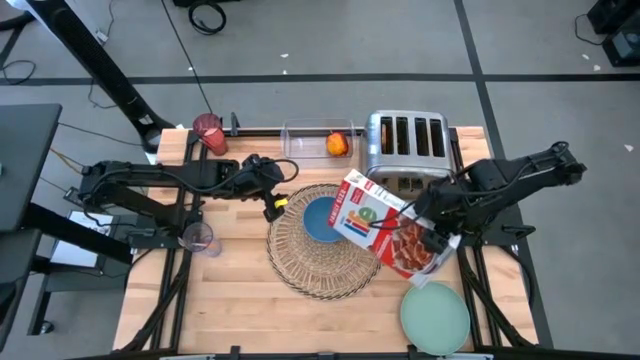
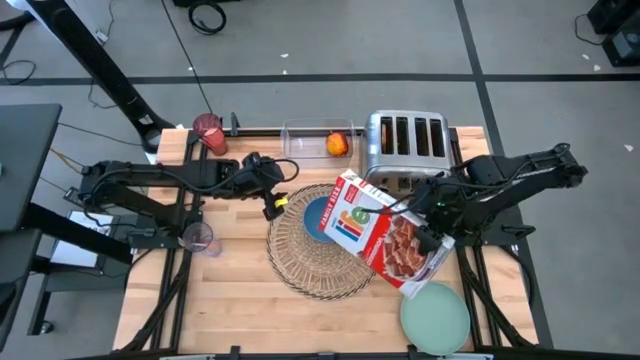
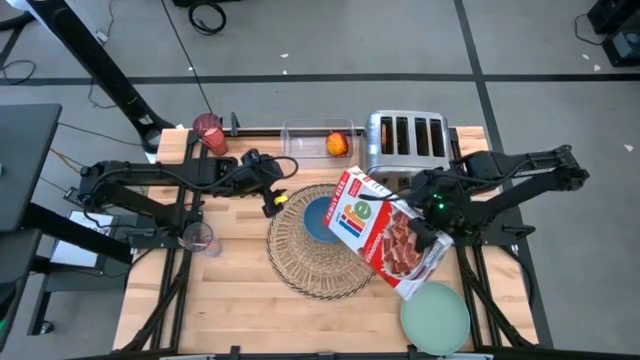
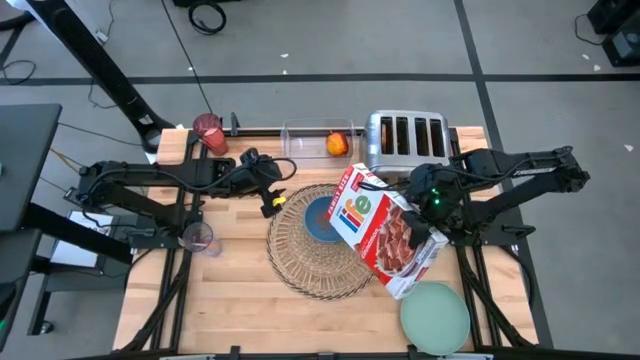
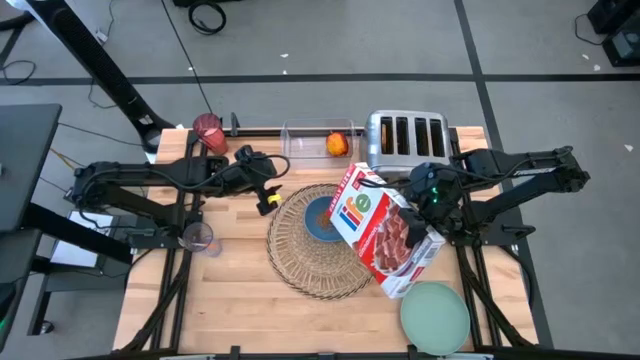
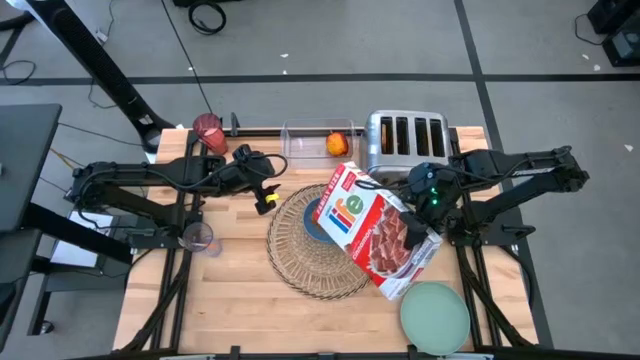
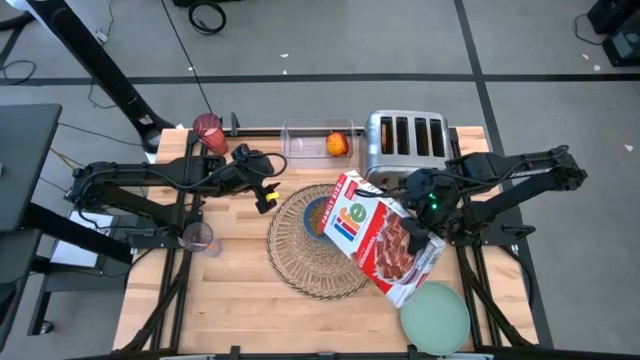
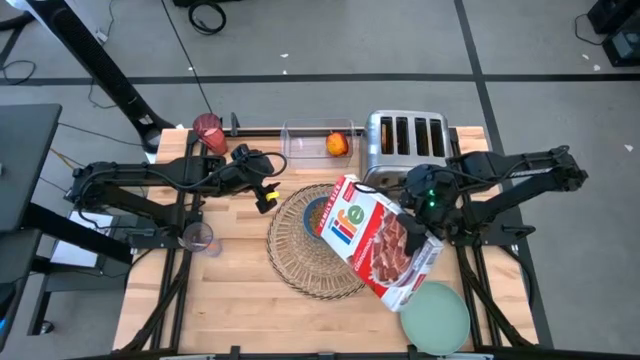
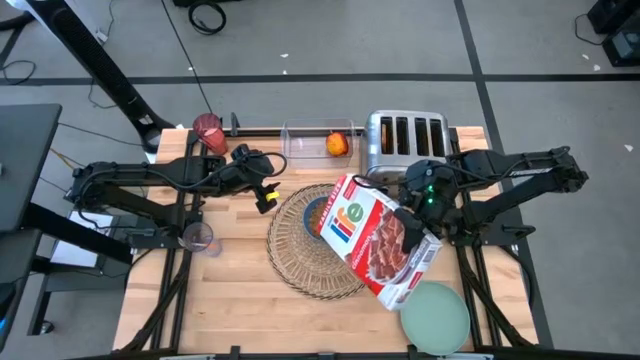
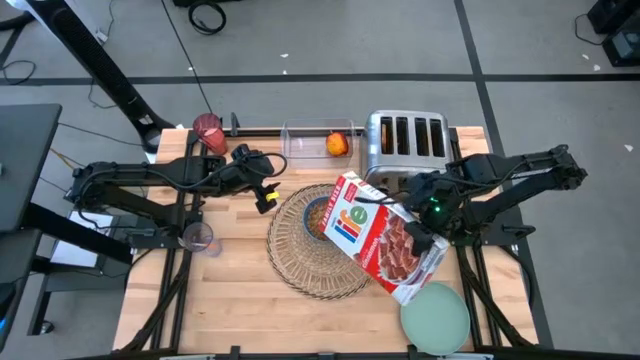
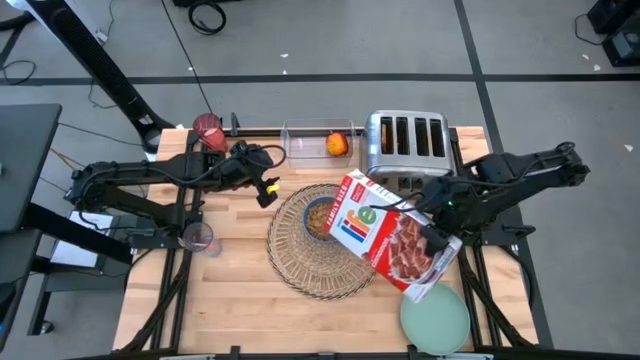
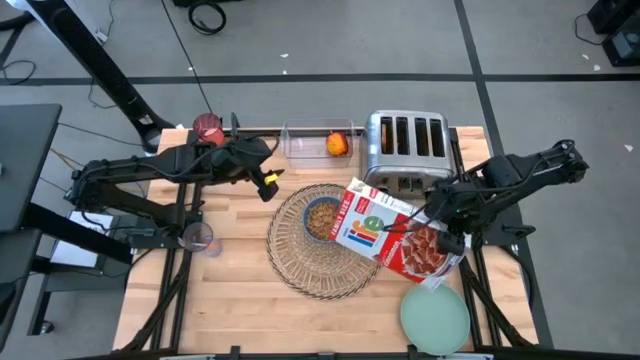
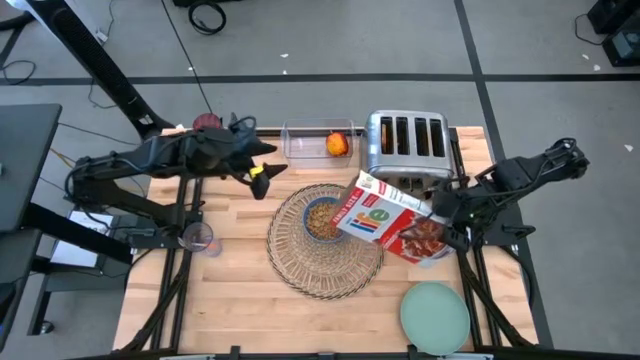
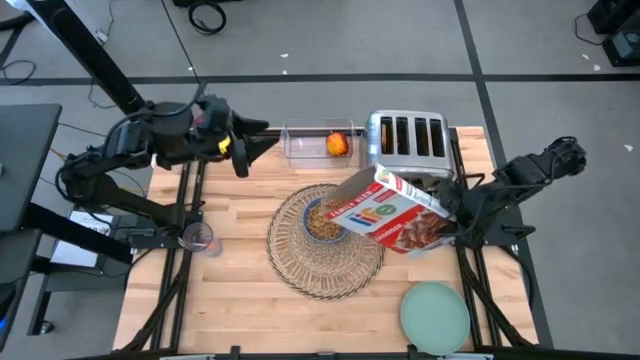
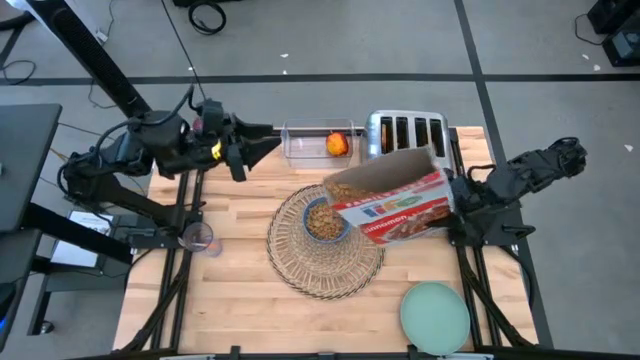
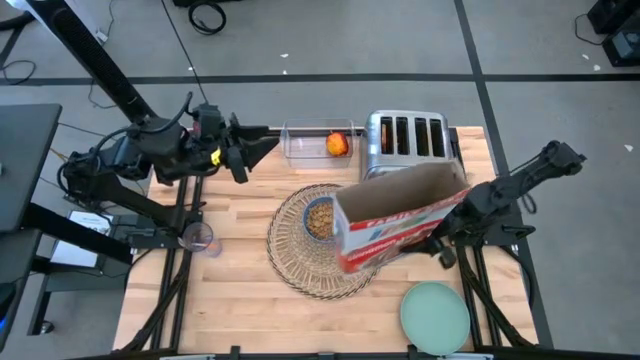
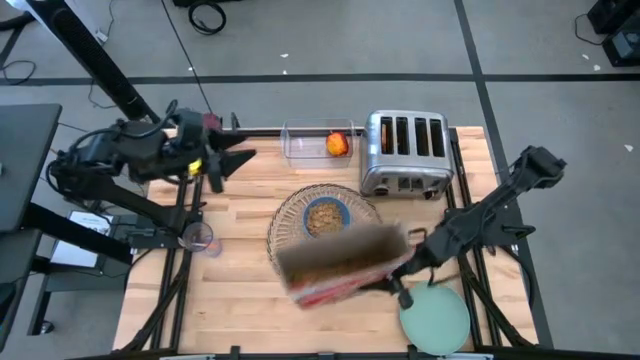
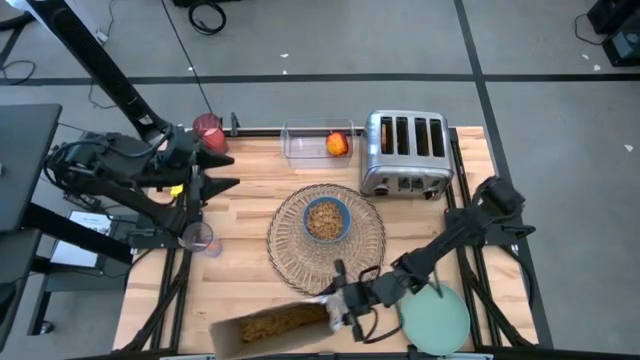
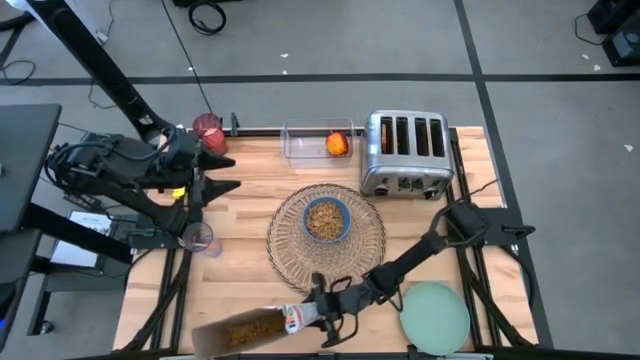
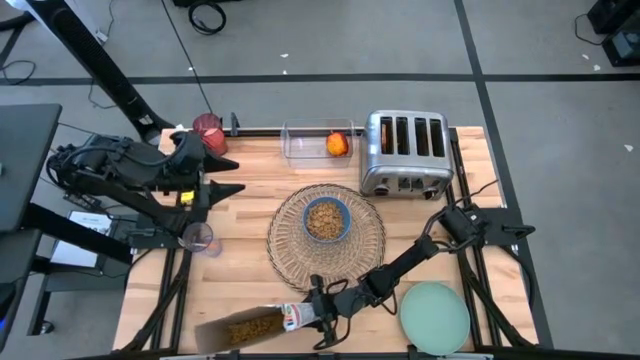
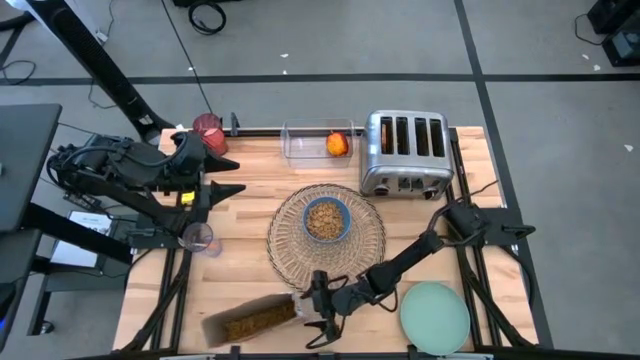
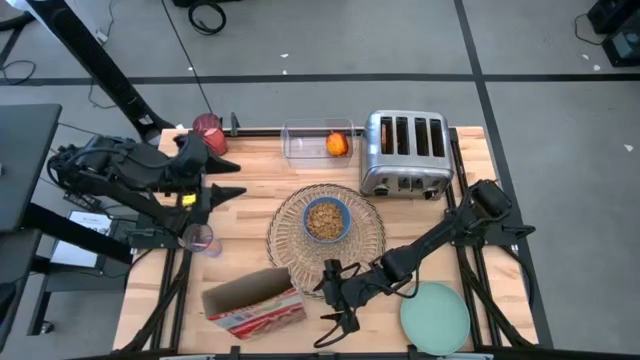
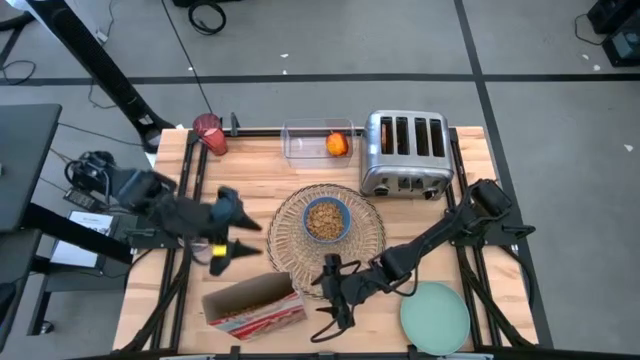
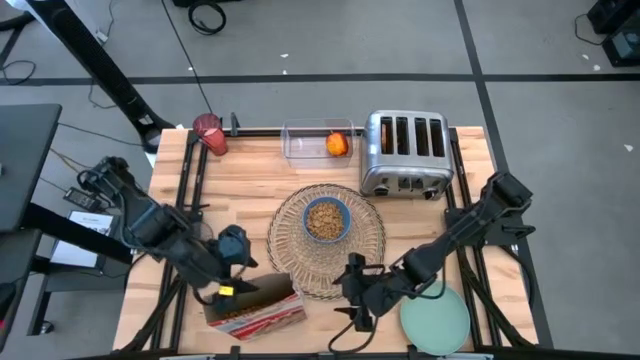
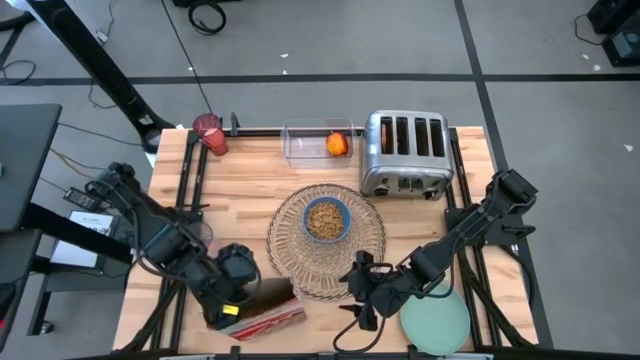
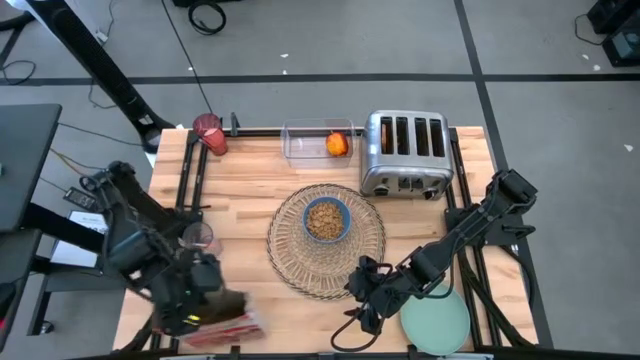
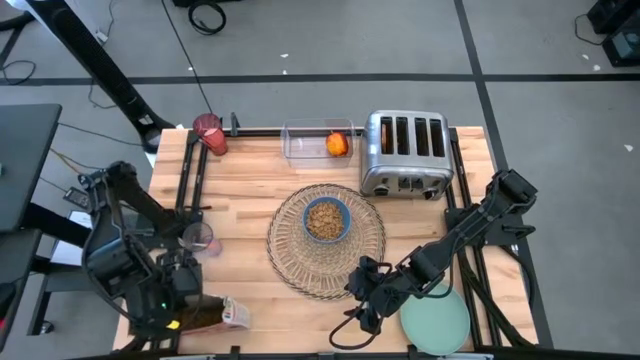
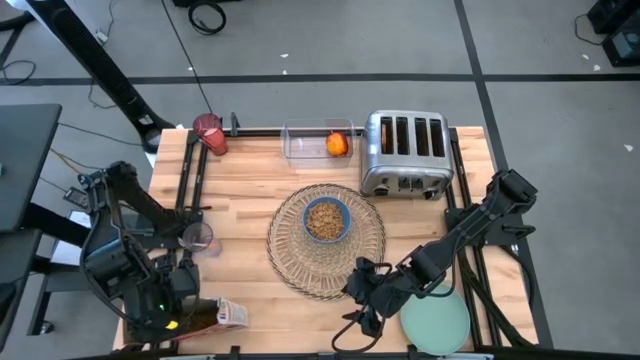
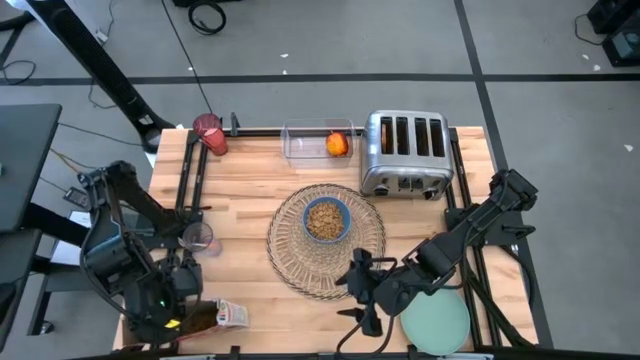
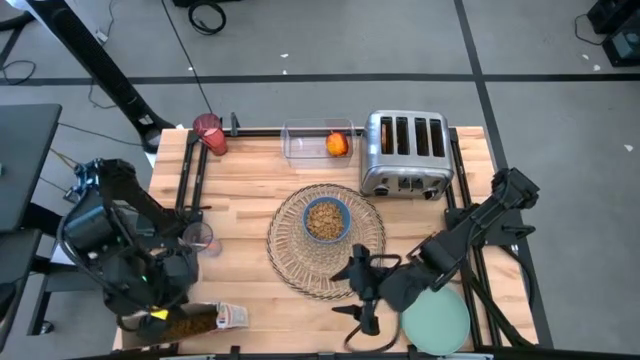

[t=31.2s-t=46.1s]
Task: Arrange a breakfast setting
Pour the cereal from the cereal box into the blue bowl

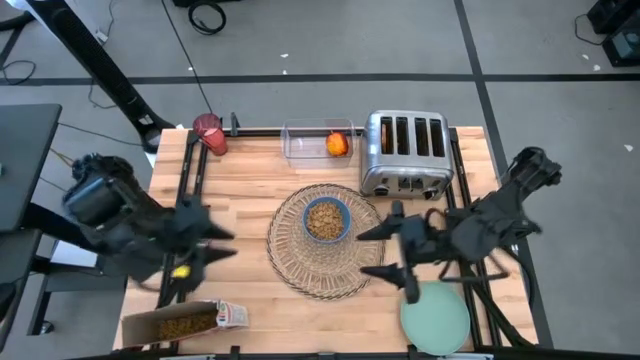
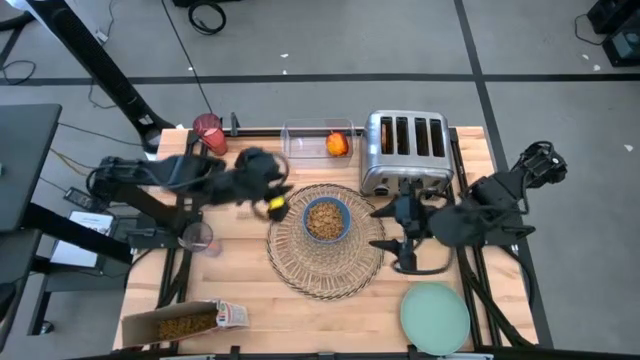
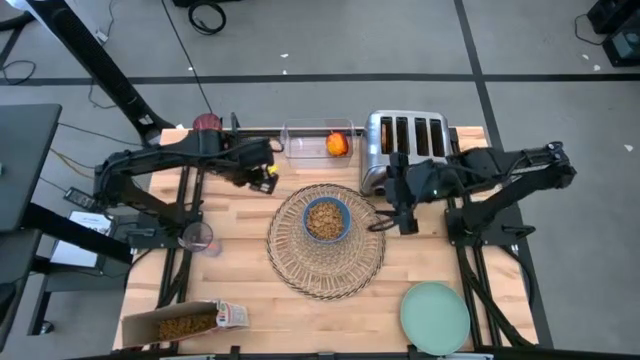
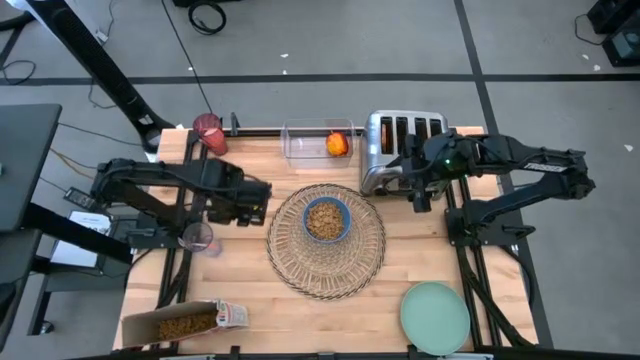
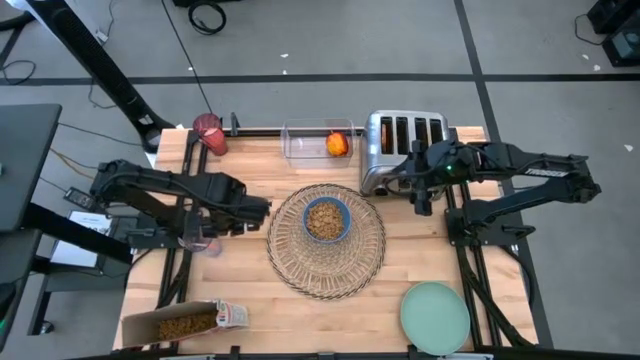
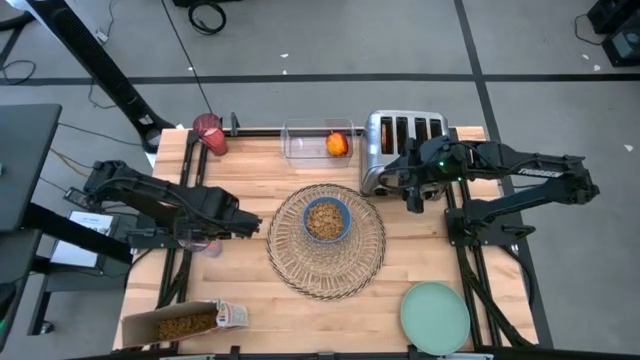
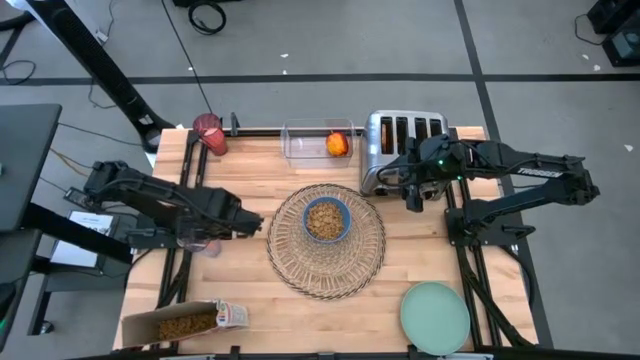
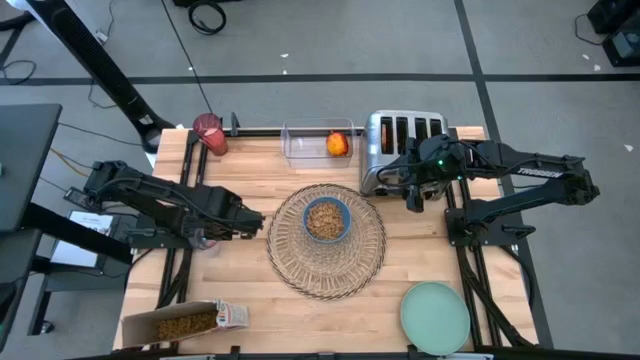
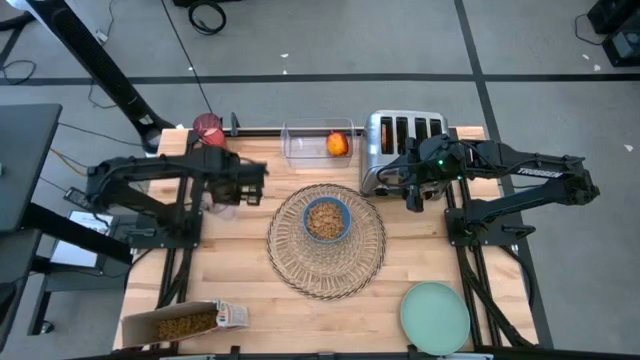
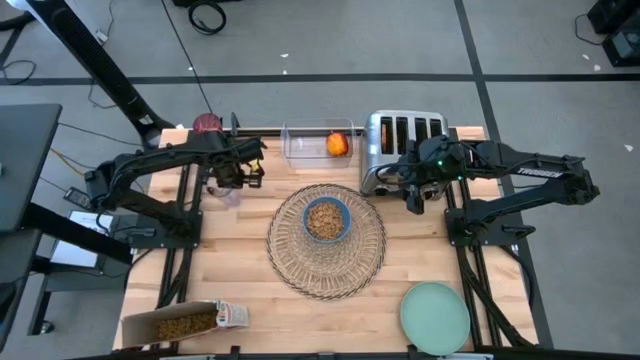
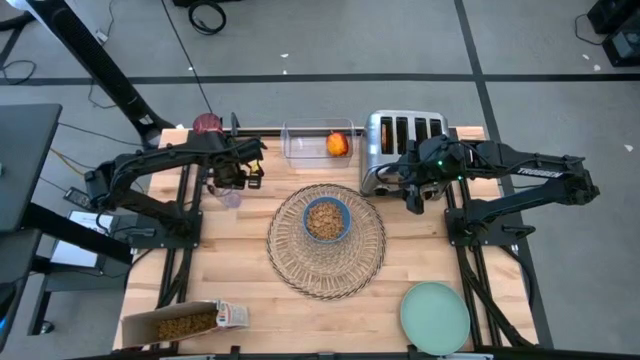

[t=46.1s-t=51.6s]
Adjust the transparent cup

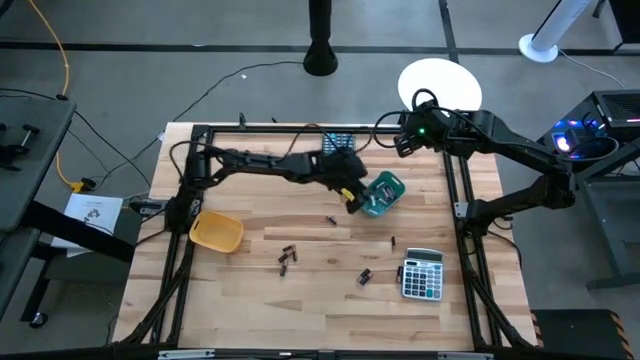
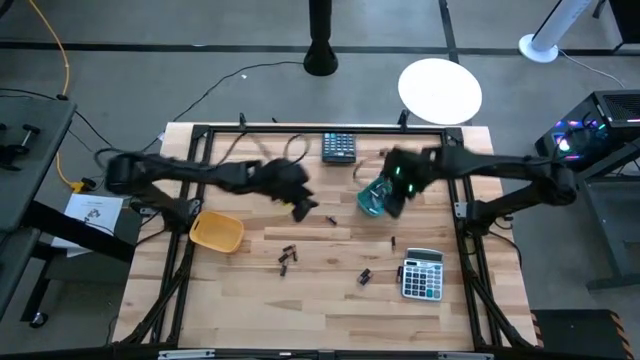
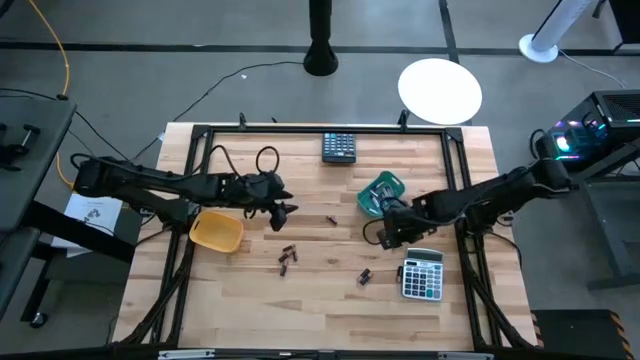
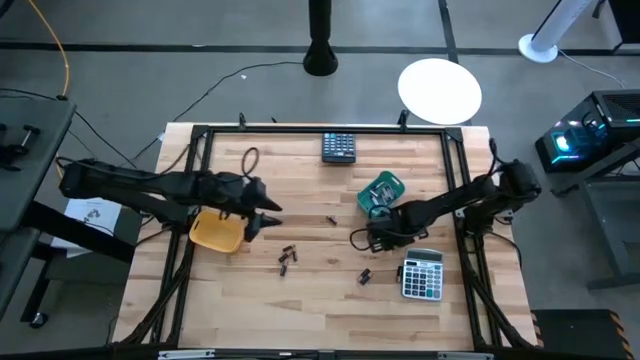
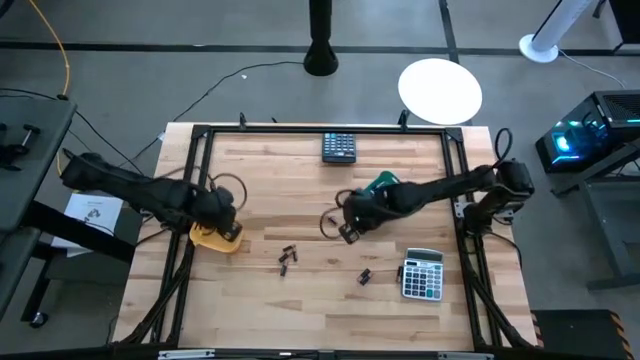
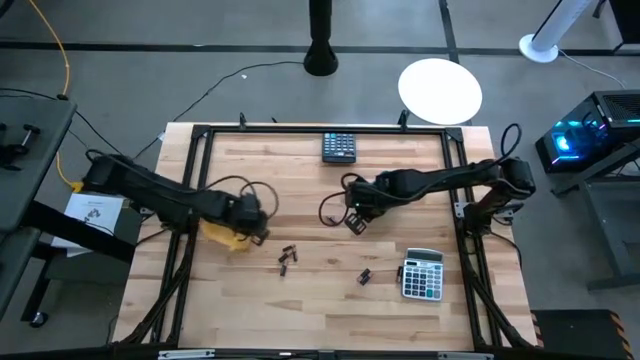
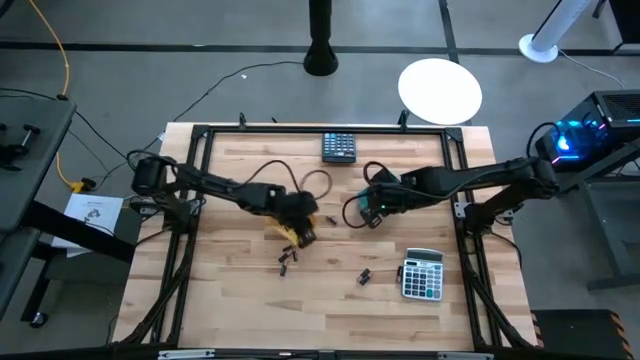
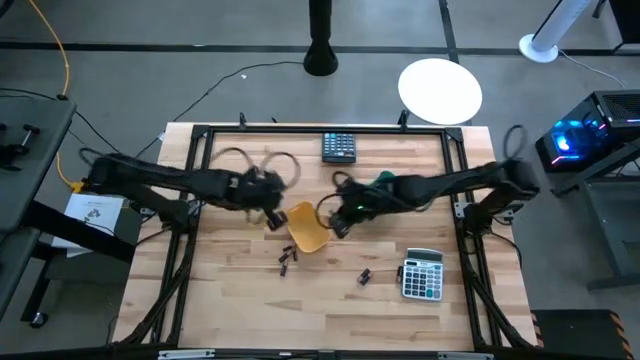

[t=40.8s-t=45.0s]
Task: Sort batteries
Put the black battery into the yellow bin
